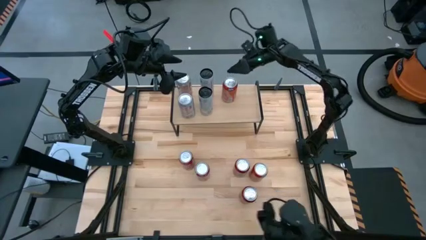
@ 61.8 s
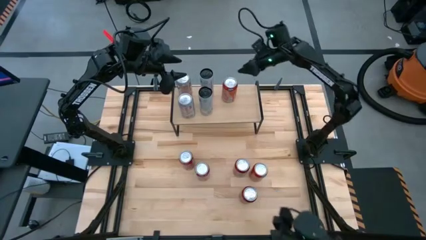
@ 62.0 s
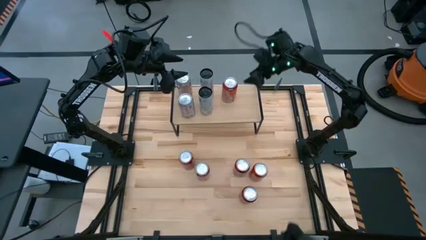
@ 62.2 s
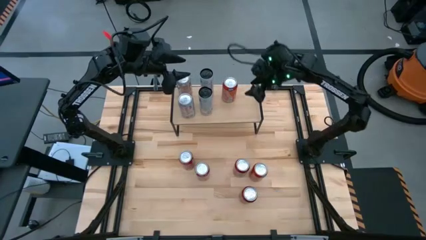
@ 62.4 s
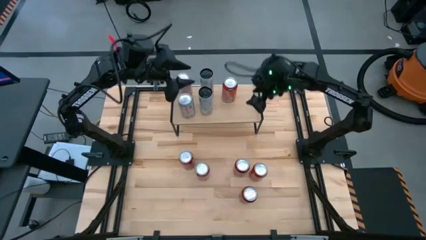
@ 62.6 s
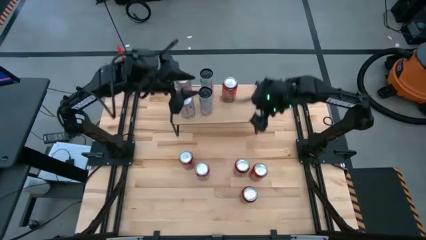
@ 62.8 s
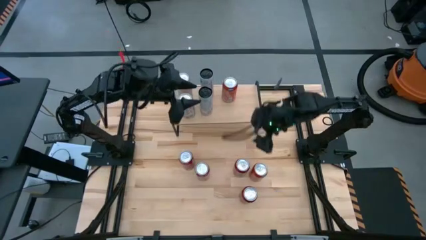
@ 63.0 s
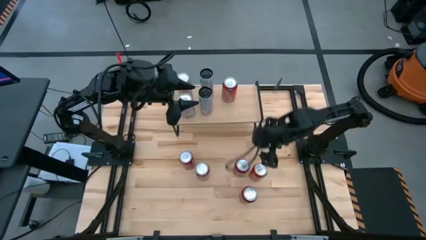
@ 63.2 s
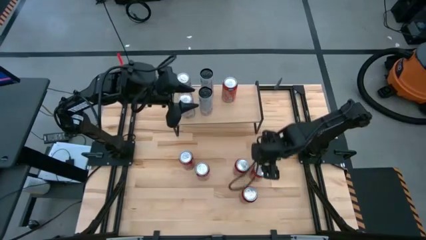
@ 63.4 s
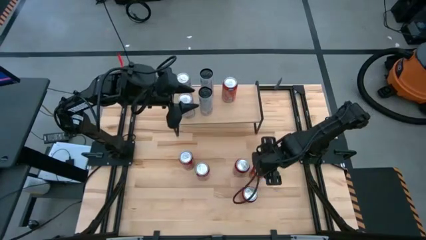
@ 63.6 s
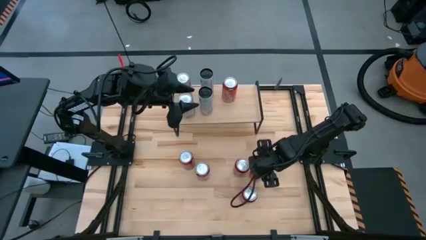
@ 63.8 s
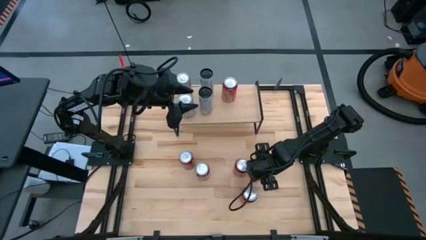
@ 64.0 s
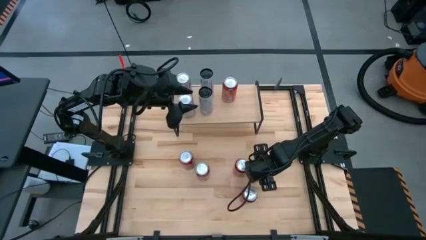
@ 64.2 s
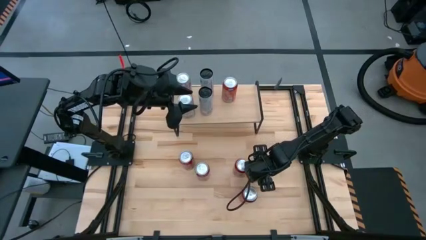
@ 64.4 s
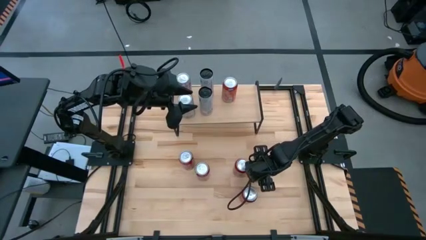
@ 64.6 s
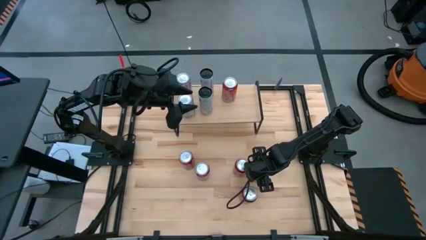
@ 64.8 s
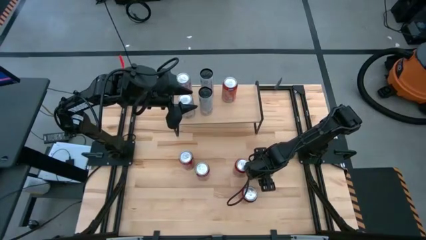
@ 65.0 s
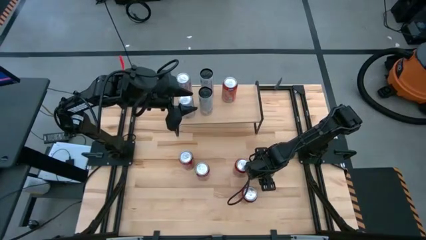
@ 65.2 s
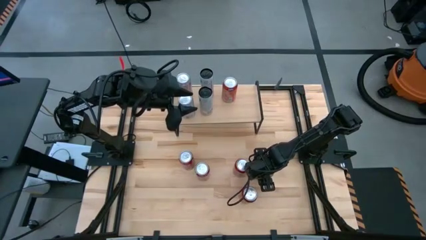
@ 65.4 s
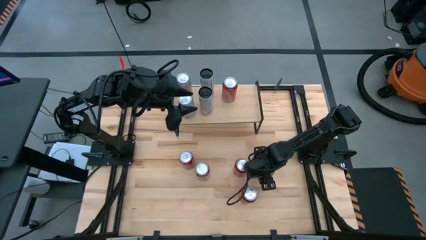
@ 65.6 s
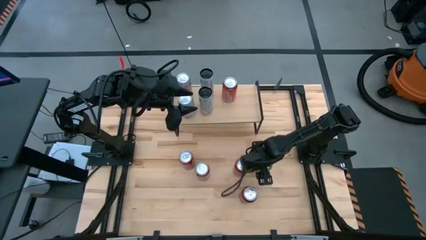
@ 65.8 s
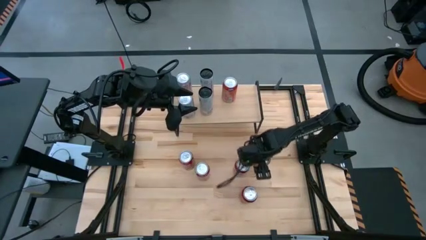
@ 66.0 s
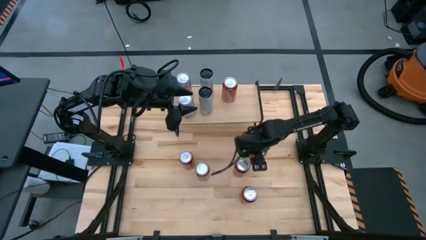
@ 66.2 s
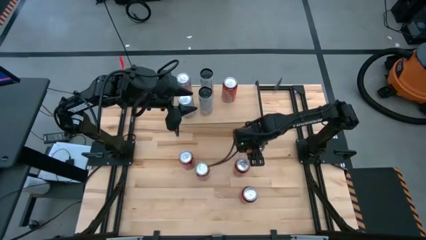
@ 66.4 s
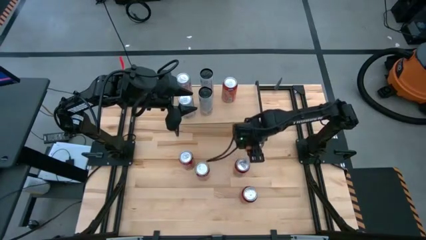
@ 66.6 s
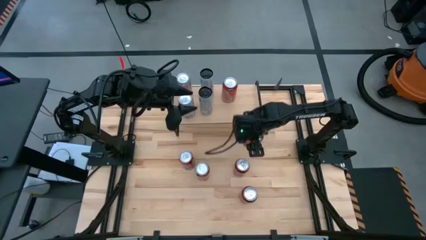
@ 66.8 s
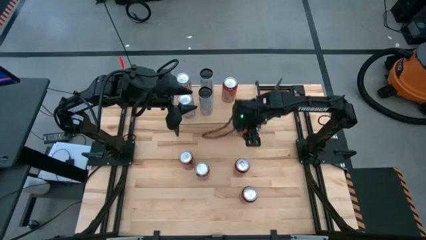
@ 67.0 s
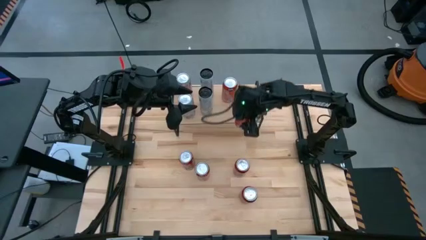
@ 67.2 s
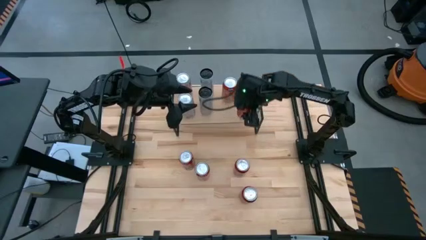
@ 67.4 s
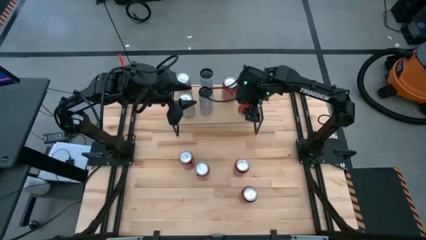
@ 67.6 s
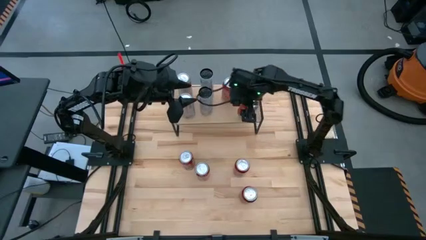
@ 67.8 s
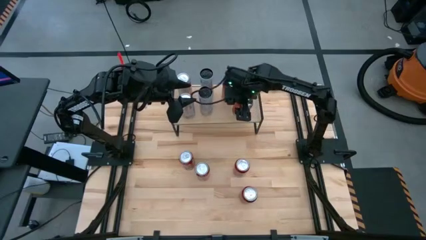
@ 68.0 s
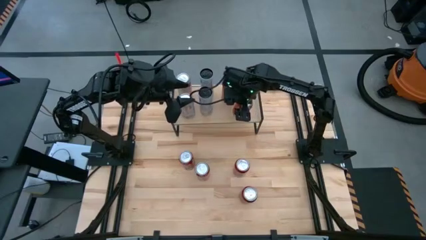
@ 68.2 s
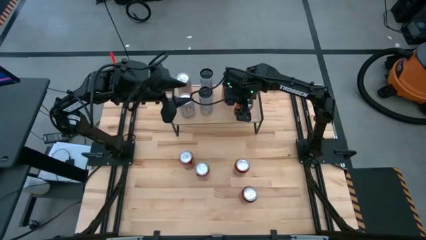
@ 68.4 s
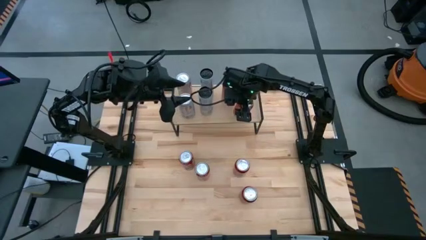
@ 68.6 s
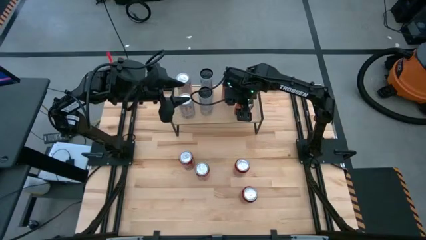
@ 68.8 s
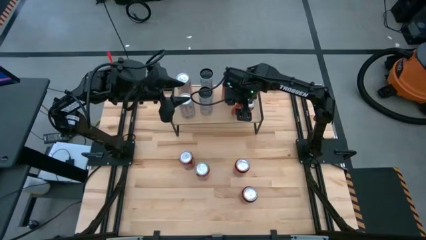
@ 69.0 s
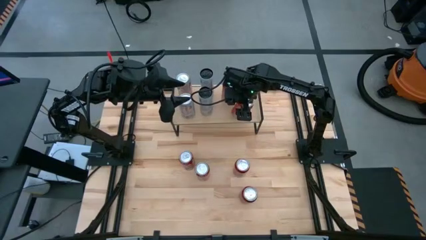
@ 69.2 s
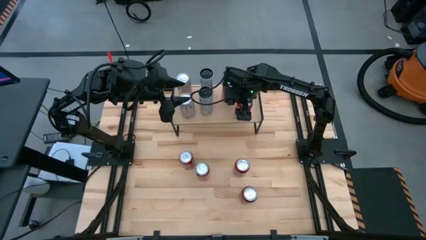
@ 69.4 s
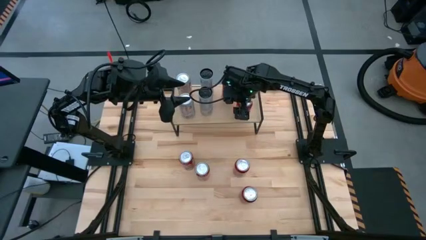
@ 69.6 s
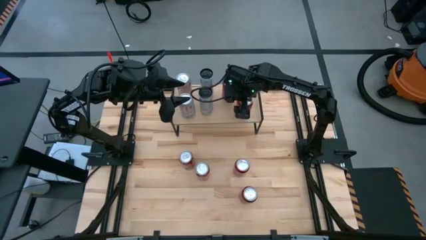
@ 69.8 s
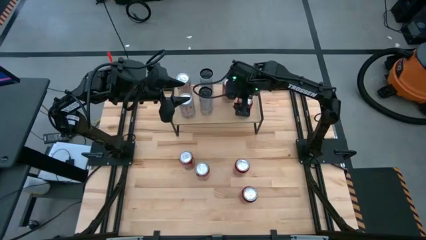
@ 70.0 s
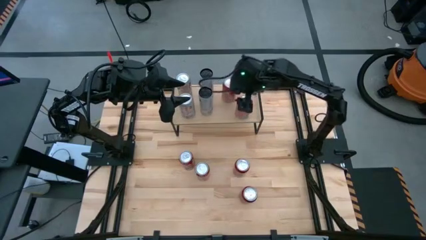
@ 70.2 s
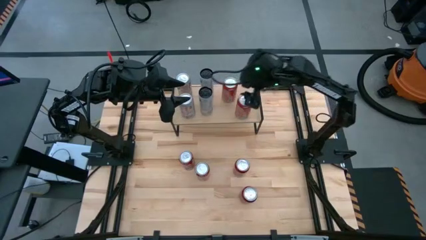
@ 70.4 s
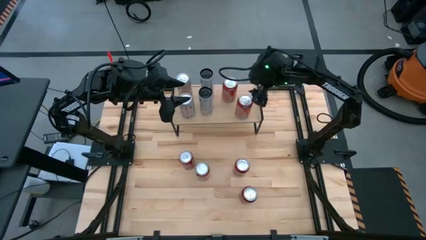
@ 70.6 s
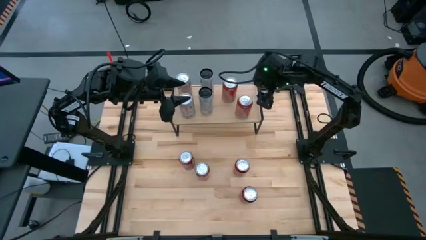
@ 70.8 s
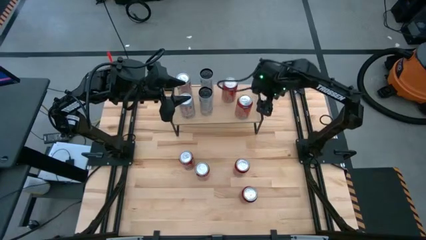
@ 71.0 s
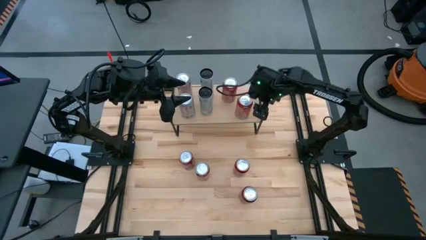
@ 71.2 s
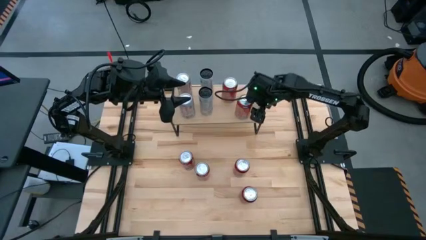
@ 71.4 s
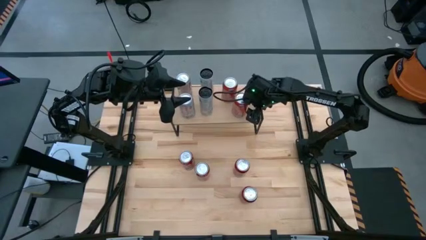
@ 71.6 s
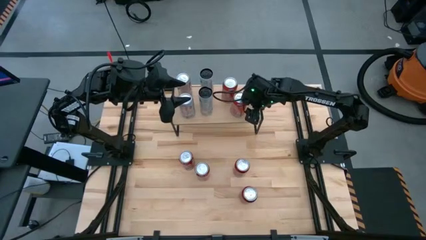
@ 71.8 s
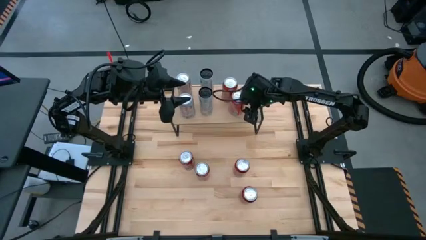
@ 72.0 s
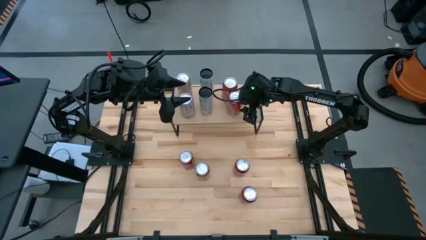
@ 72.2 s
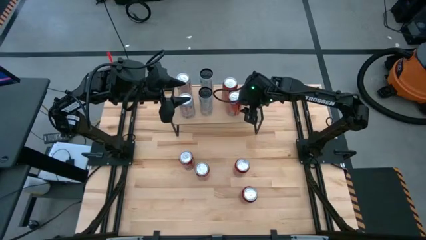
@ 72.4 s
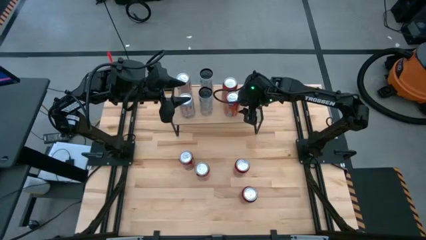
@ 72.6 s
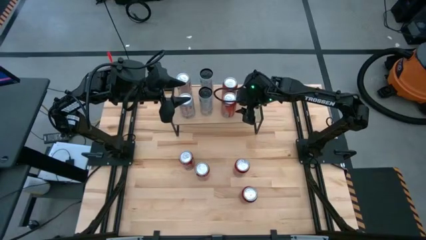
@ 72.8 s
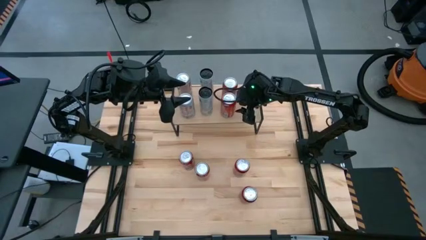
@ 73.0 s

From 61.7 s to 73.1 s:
Task: Place canned beverage on shelf
Put the red soda can aligned with the other red soda can on the shelf

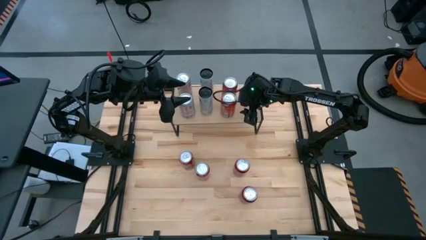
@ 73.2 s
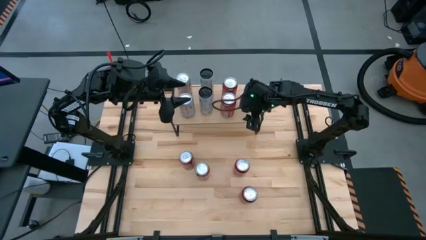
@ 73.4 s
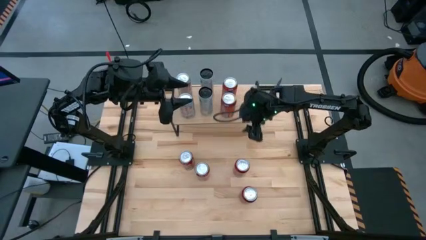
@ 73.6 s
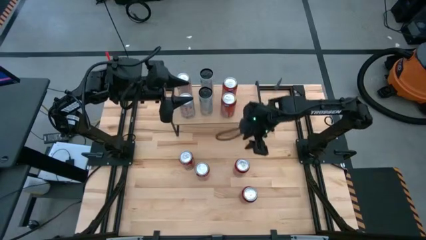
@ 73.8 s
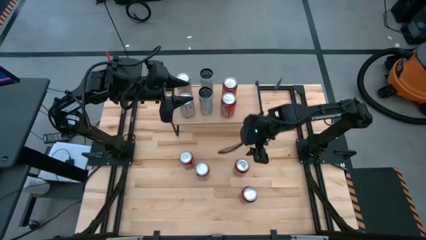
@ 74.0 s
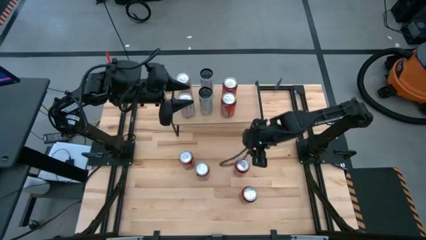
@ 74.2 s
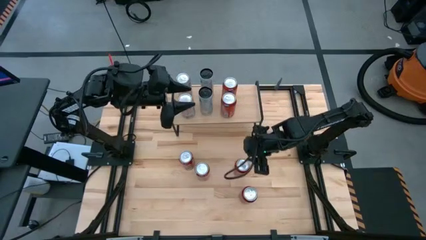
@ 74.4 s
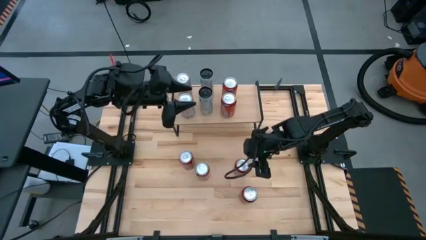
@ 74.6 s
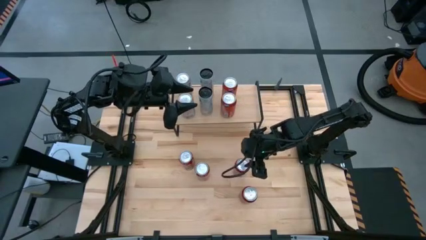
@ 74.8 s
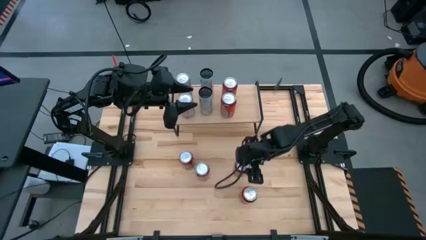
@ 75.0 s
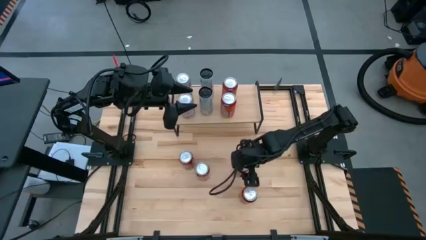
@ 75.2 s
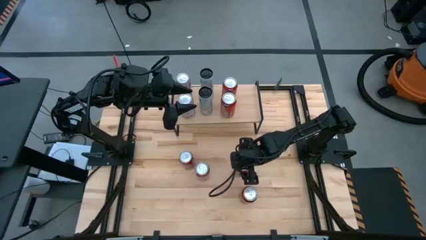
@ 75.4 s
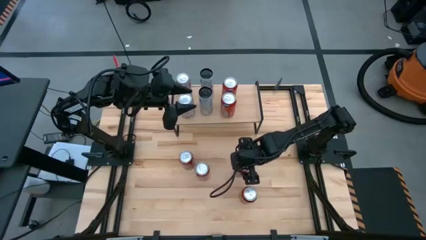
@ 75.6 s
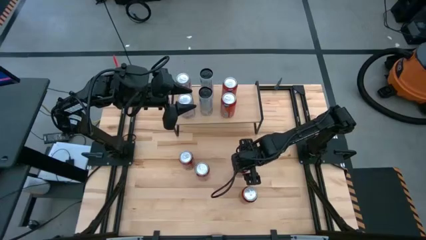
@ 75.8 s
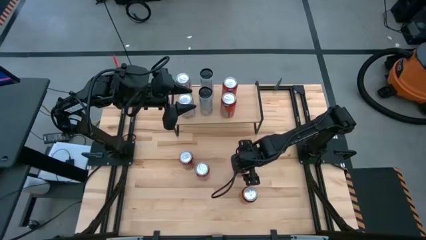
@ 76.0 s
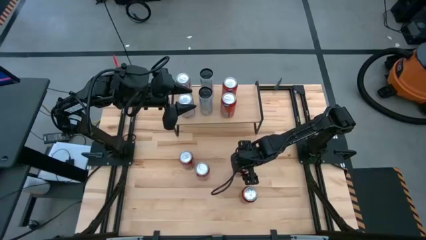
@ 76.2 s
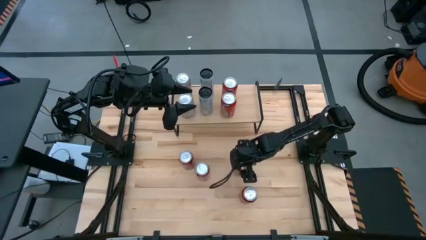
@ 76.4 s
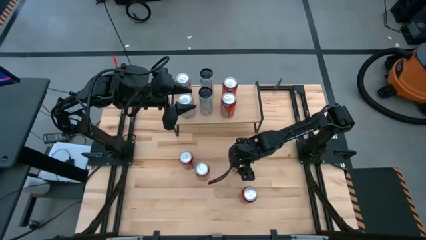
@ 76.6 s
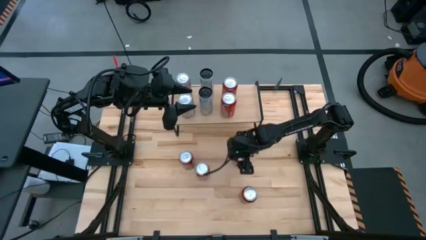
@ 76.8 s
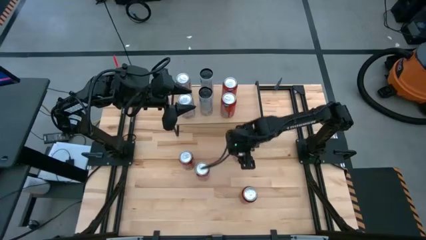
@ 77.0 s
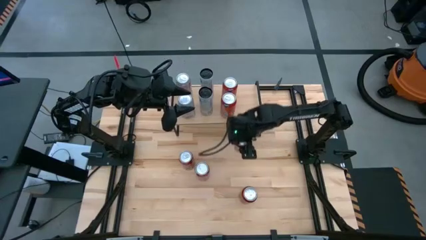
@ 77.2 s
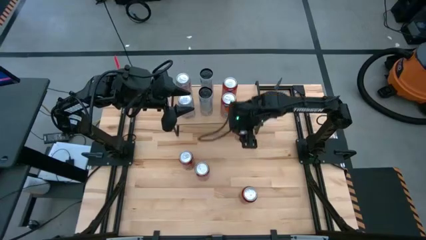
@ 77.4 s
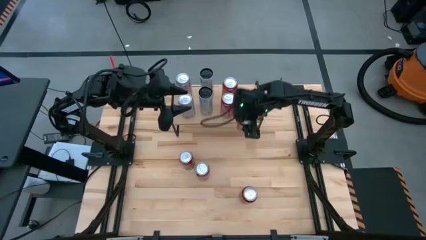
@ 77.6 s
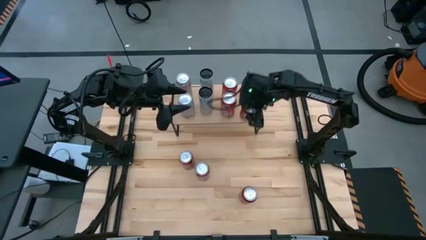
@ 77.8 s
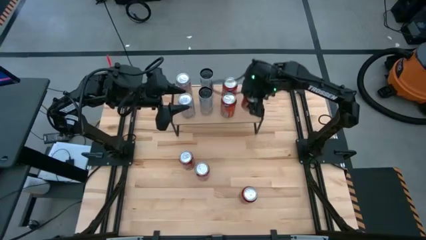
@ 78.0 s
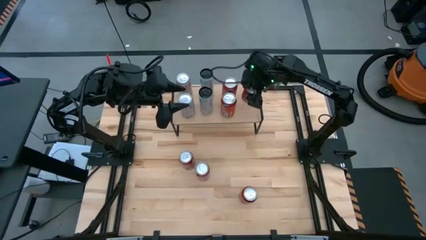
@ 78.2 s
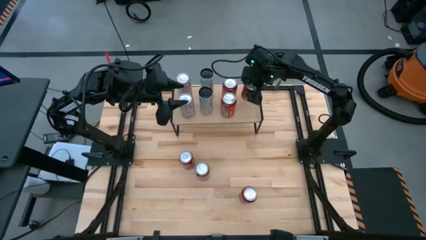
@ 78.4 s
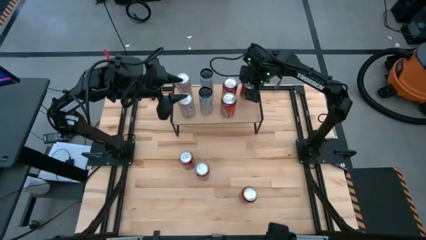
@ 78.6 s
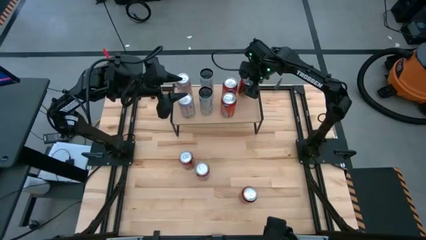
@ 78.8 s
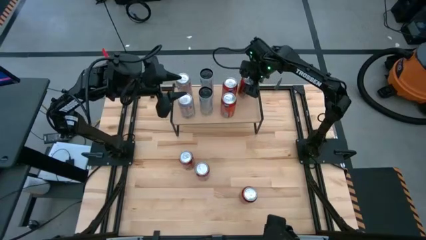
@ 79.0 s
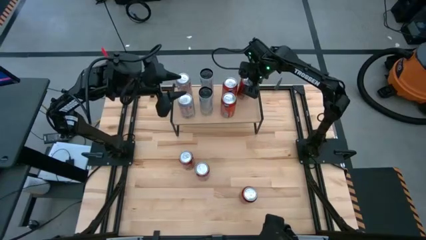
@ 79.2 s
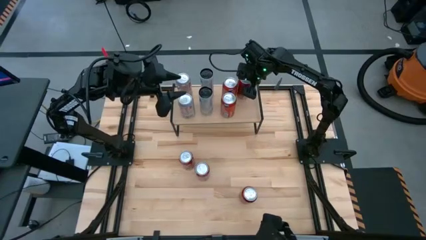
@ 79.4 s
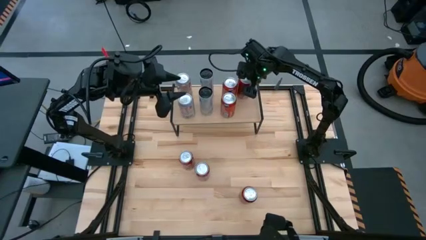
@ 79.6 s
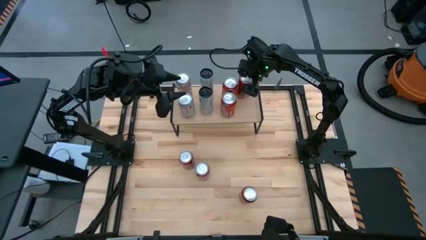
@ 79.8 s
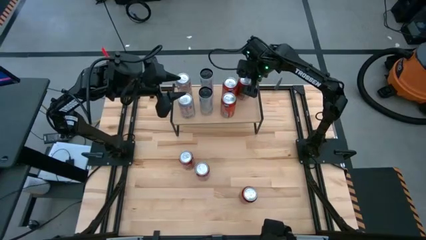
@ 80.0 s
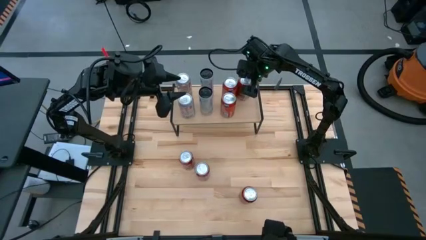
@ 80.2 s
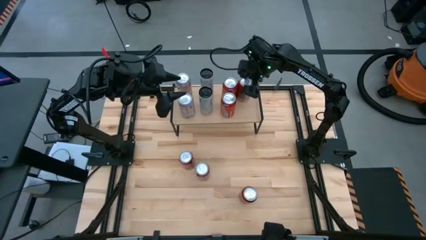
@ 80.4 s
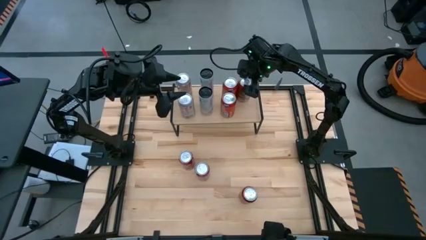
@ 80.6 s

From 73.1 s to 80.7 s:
Put the top red and black soda can on the shelf
